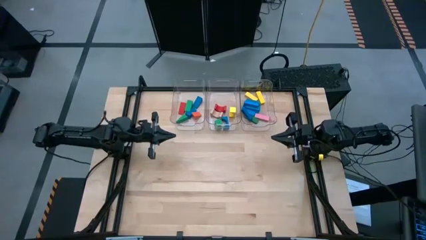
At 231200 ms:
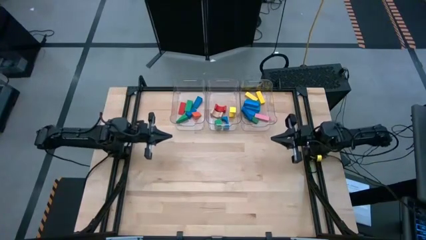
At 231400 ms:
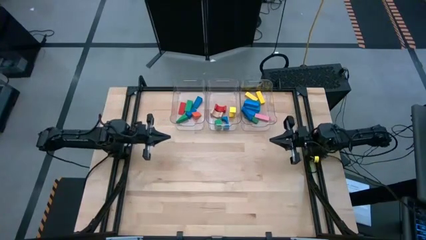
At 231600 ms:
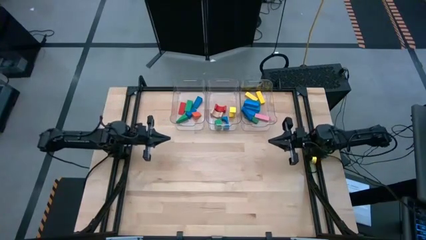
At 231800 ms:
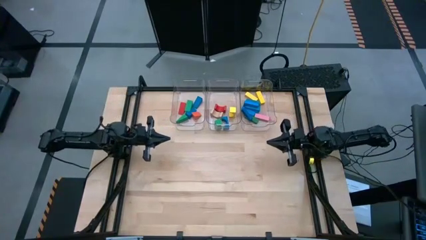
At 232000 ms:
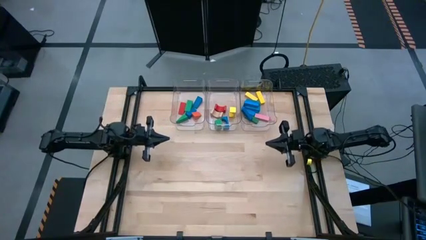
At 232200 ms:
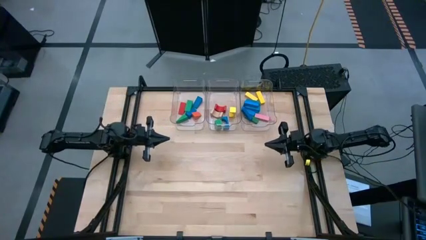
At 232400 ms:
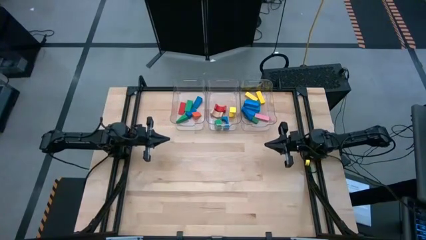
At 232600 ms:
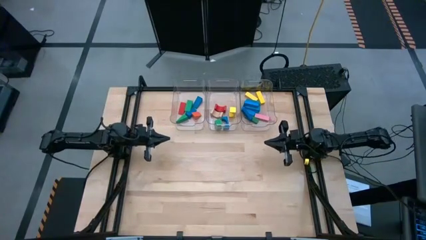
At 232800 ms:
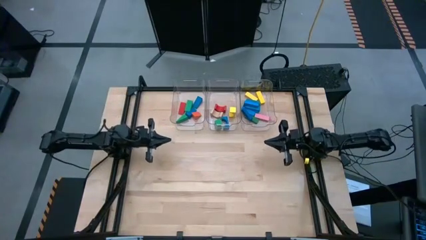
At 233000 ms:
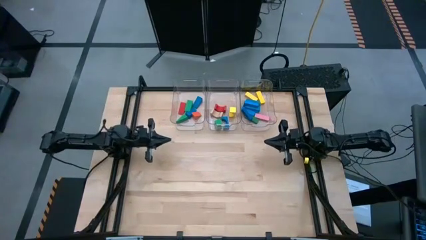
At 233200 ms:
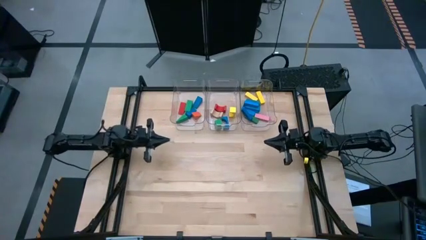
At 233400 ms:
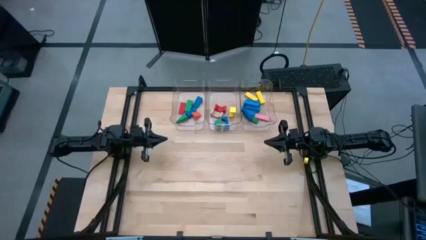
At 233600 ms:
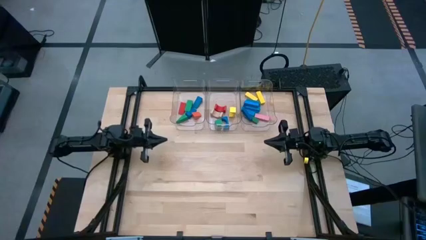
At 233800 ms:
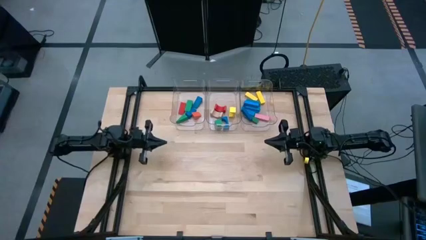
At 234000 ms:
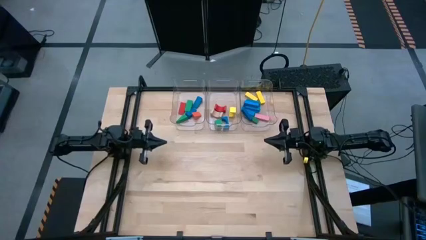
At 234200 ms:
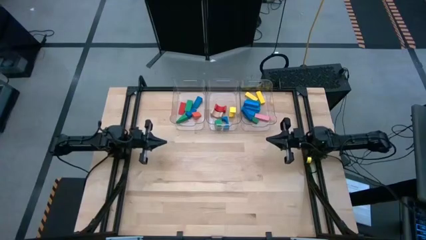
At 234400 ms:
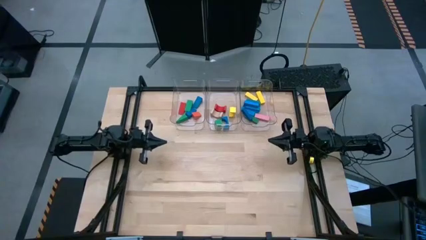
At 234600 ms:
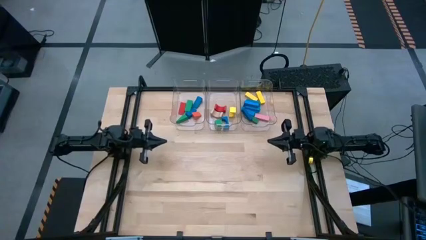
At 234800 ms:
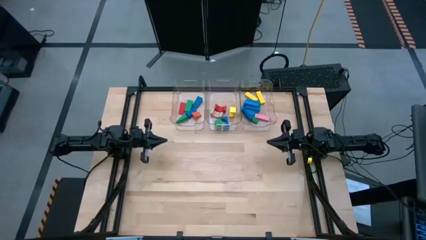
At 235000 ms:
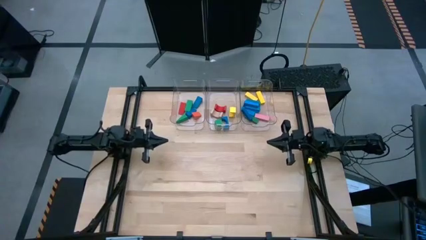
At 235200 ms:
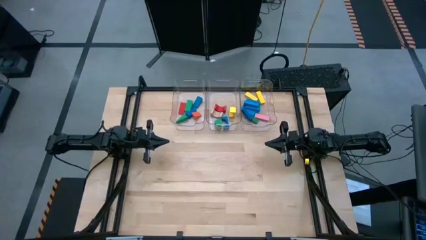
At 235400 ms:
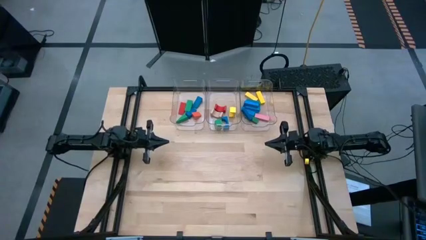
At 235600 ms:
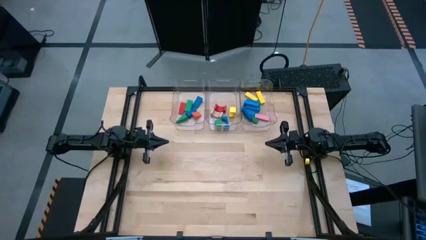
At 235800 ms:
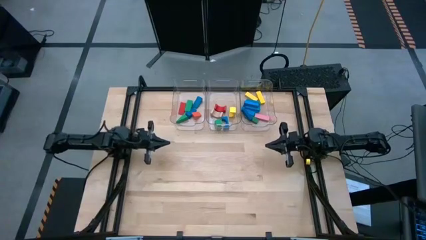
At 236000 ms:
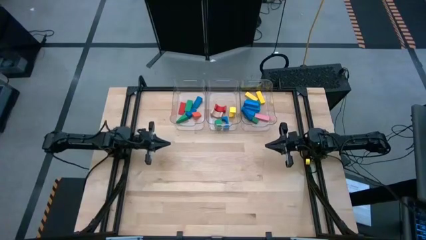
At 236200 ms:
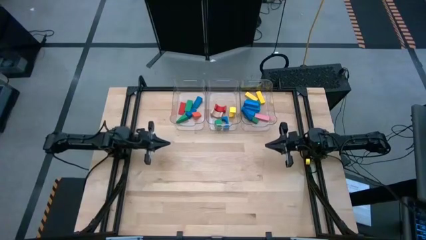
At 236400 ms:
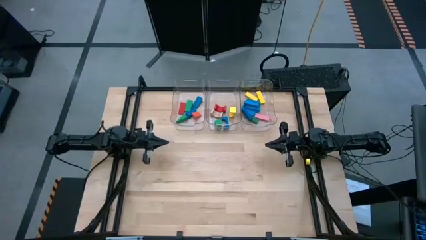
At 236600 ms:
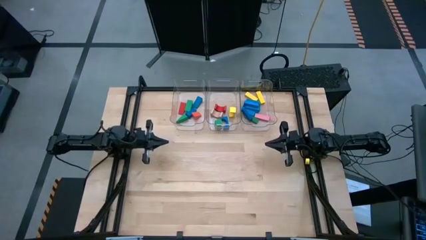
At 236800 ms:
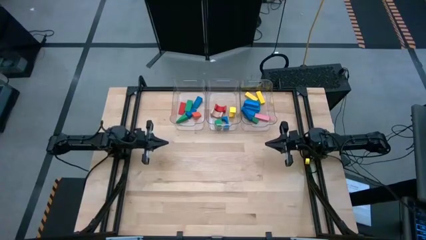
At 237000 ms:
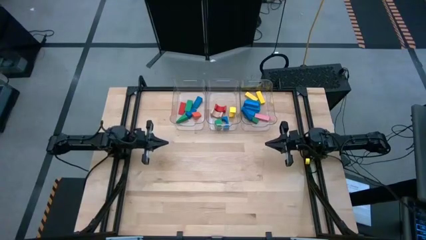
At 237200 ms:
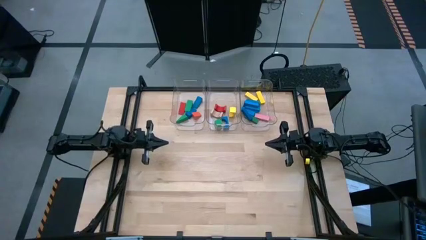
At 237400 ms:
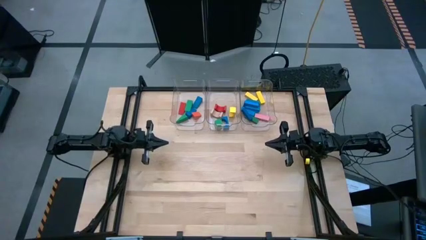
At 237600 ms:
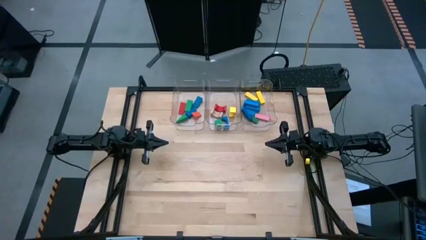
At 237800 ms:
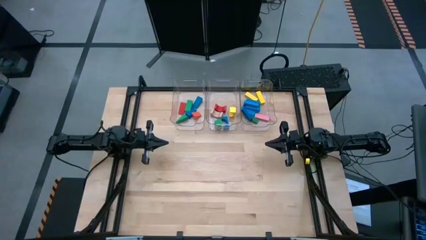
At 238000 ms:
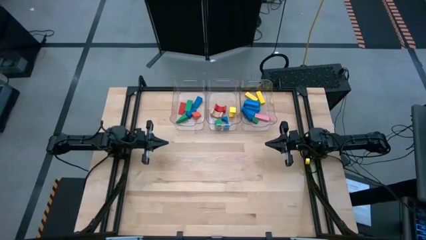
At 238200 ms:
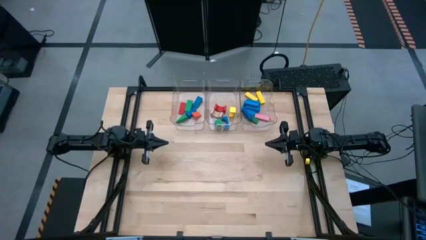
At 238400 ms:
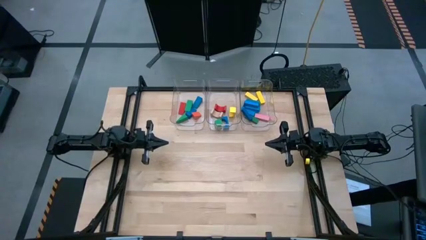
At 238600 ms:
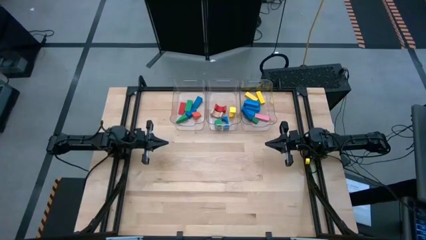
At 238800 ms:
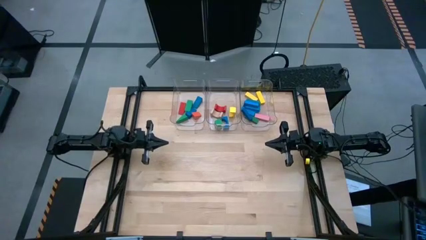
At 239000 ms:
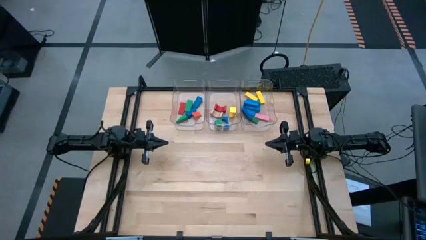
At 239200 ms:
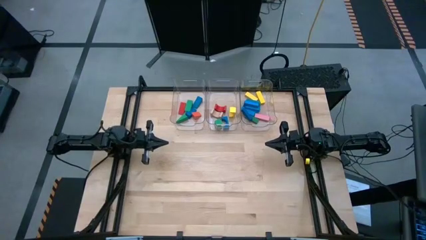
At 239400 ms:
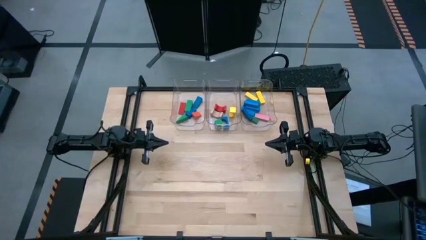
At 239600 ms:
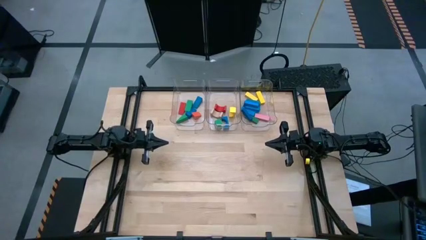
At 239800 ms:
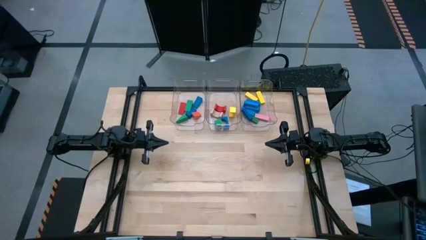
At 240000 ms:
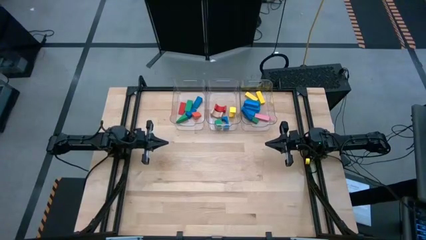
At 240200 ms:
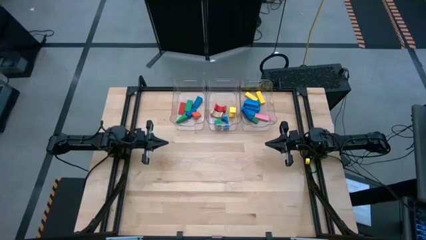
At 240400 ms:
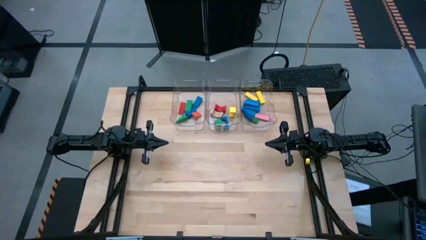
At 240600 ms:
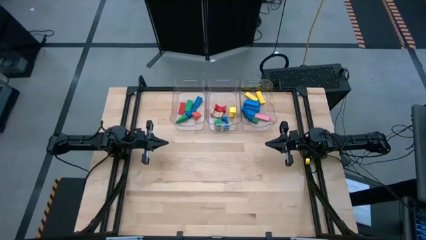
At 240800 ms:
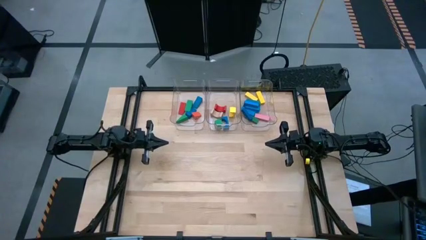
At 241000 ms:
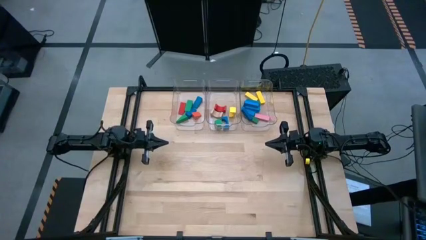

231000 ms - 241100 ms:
Task: Sort blocks by size
Return to Home Position
